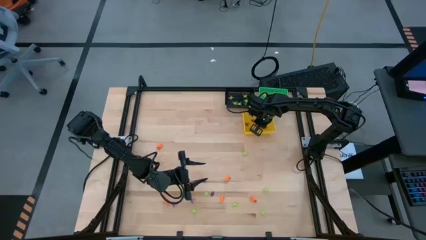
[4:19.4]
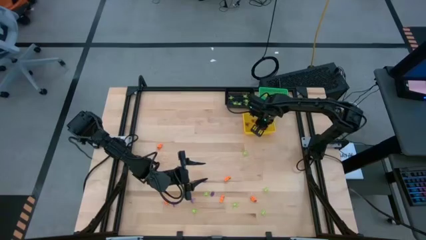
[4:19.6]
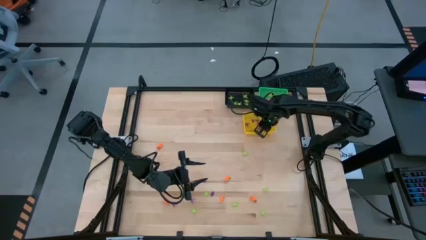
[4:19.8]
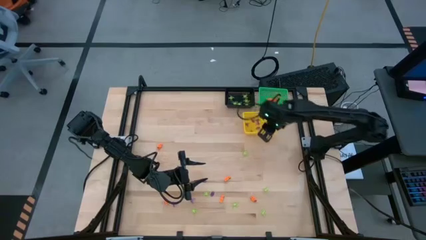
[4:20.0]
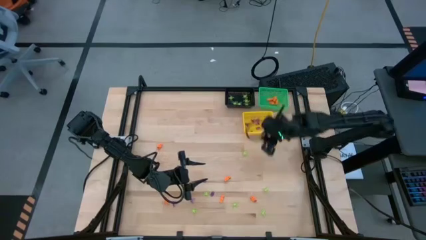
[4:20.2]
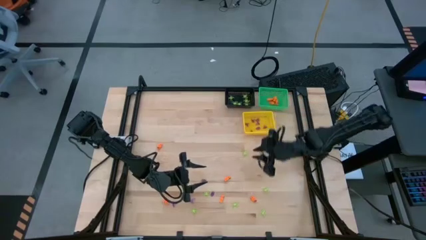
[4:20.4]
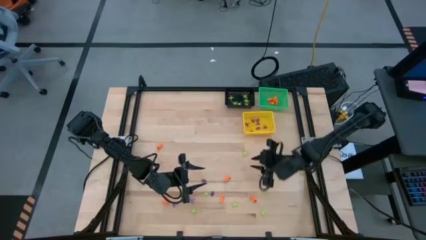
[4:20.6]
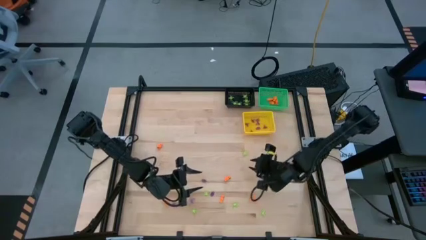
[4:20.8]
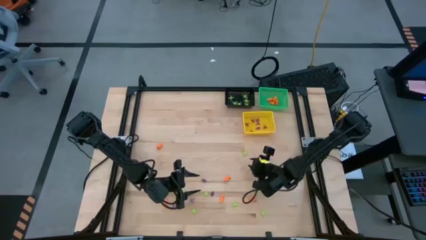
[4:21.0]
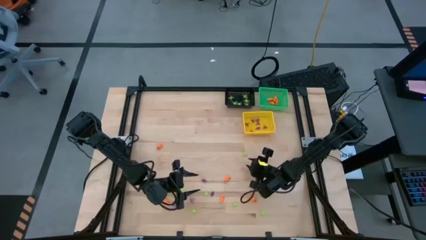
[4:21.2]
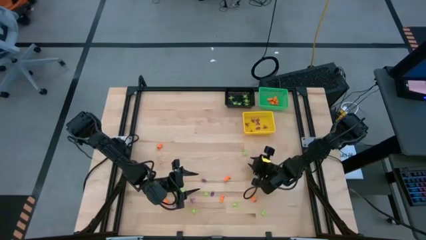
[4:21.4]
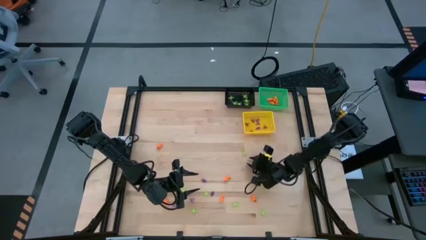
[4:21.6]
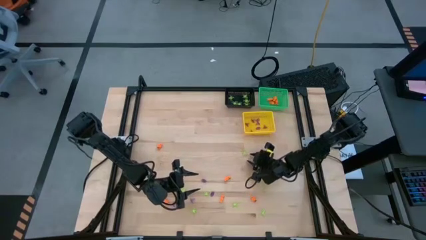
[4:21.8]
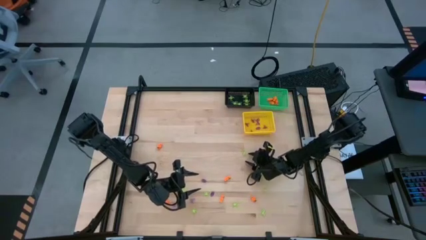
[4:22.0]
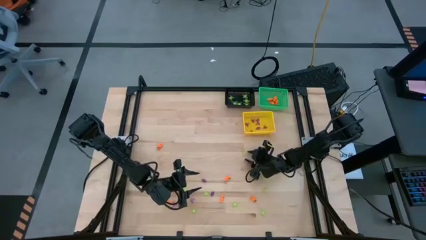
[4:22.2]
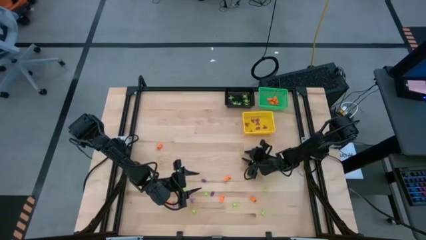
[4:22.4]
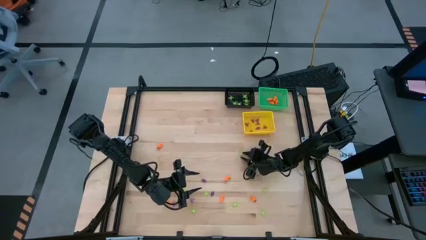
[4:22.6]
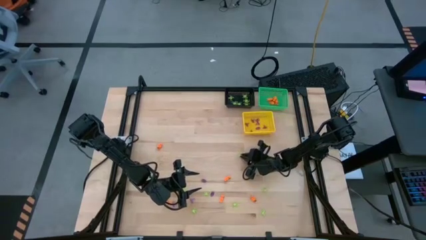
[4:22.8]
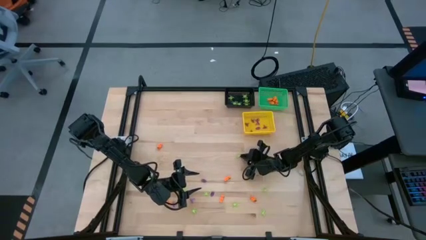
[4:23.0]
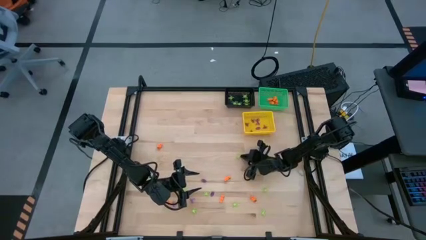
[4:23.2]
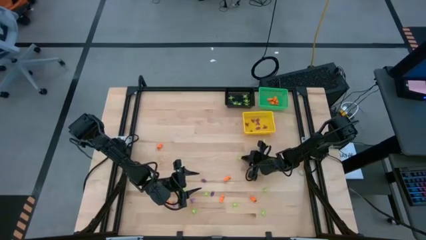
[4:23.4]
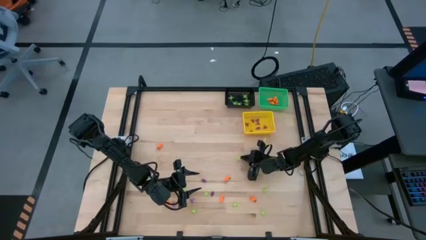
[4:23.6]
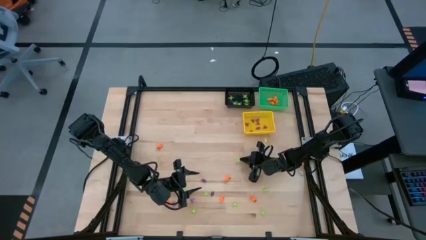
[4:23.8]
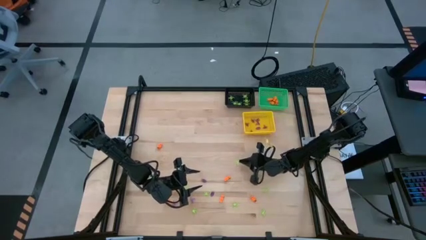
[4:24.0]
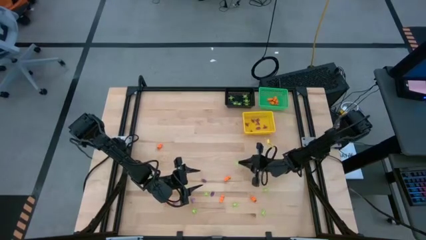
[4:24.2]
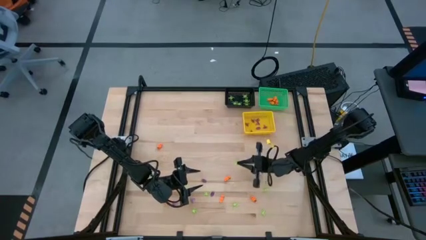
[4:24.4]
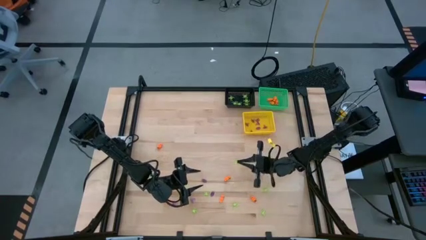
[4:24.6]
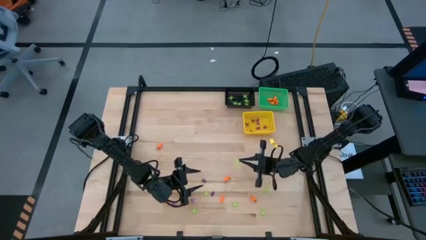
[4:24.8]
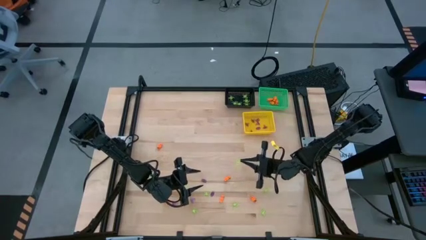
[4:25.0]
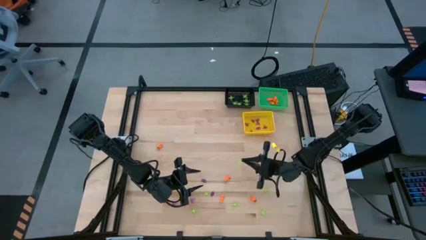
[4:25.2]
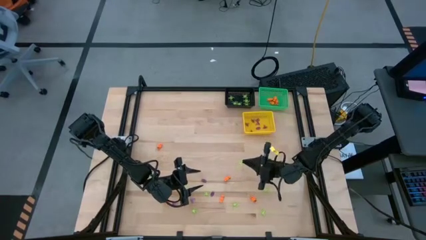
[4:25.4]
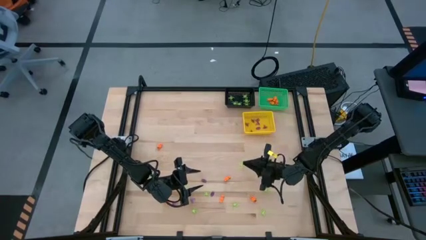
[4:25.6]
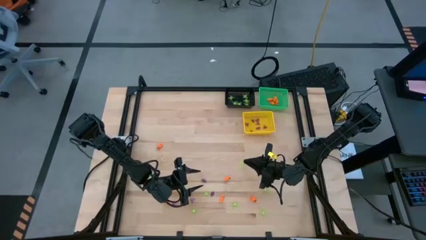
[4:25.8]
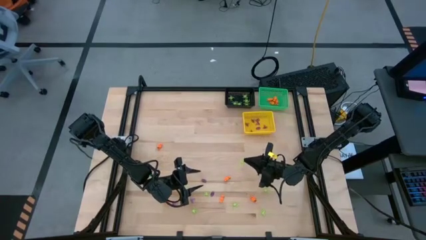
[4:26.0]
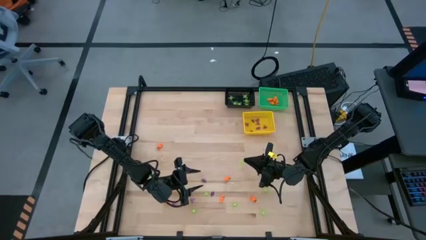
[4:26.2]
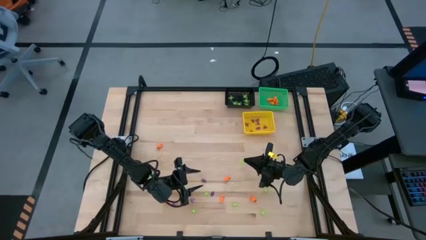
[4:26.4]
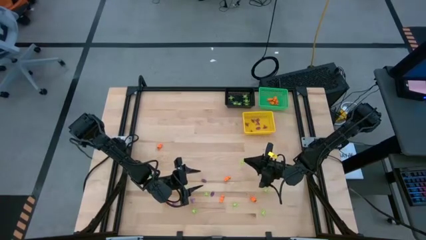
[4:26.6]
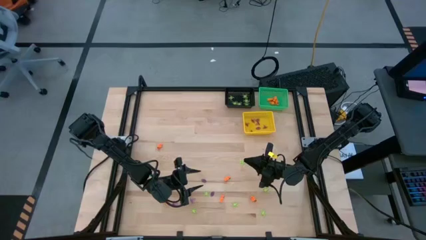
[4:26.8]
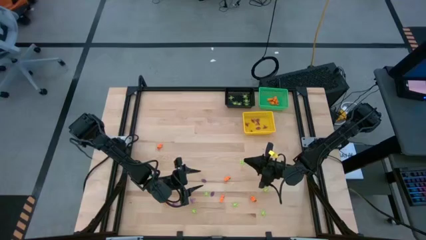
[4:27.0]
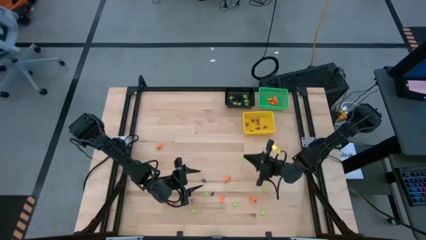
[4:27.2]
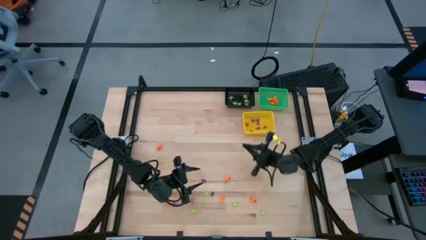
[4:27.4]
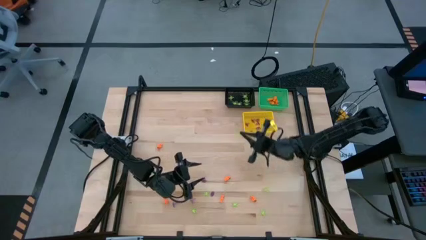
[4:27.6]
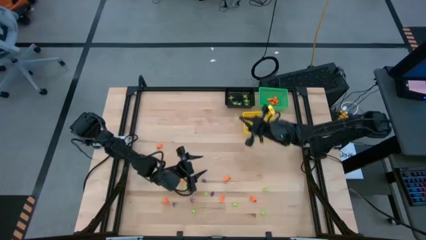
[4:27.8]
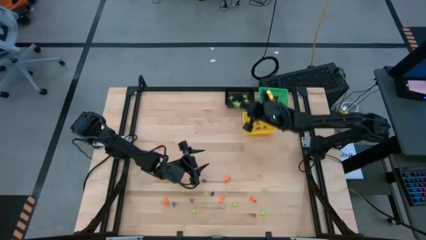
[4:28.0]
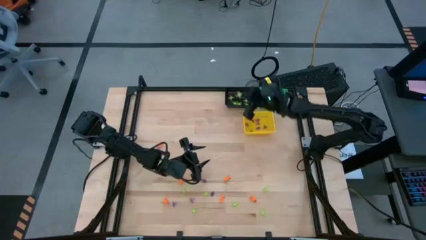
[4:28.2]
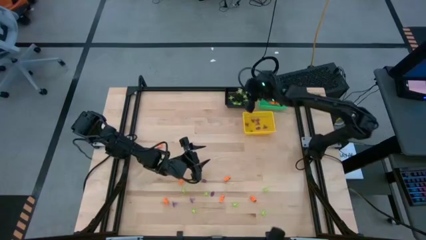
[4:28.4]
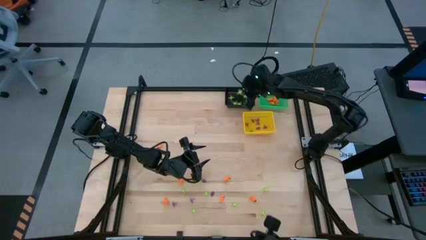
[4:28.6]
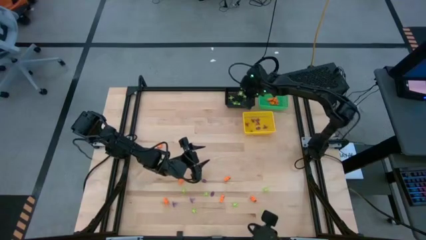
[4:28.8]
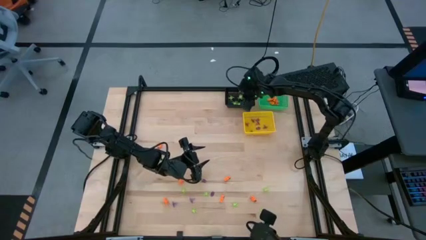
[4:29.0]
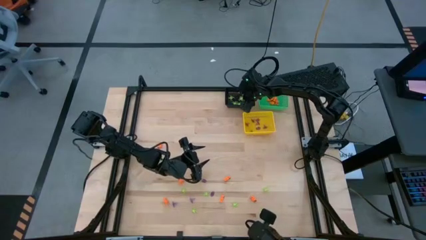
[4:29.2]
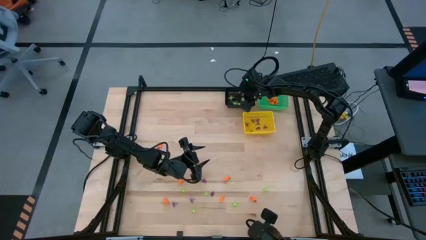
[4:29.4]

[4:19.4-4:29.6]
Task: Sort Halloween decoration
Put the green spider toy into the black basket

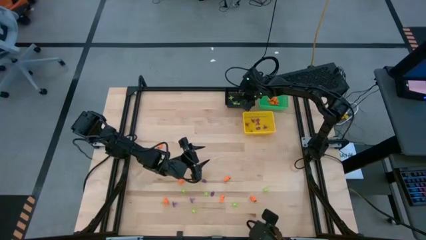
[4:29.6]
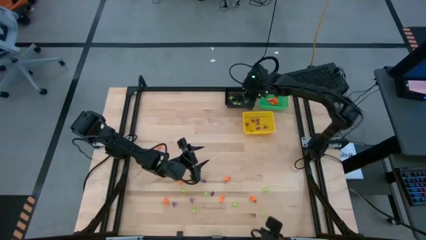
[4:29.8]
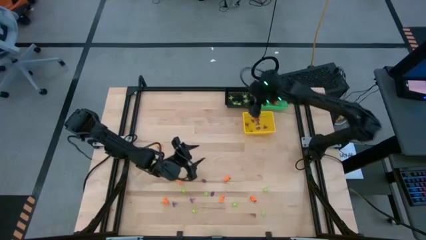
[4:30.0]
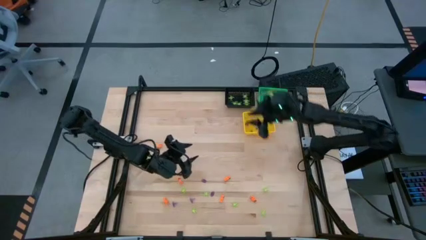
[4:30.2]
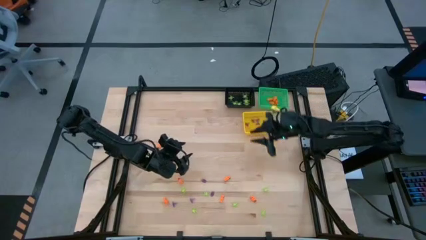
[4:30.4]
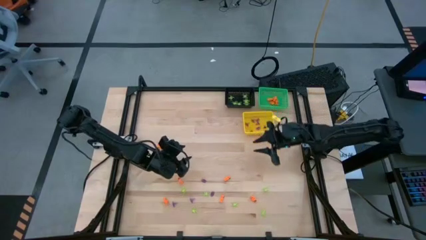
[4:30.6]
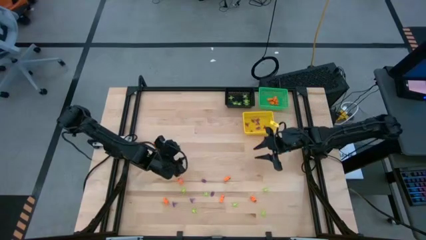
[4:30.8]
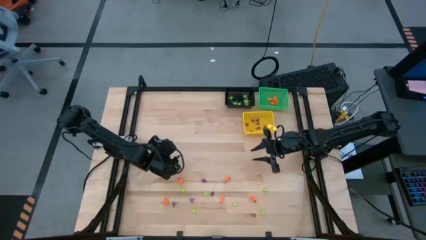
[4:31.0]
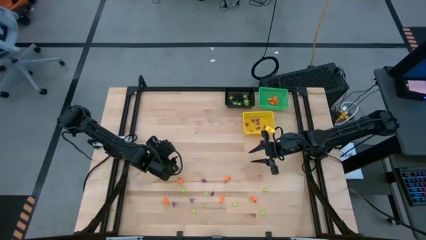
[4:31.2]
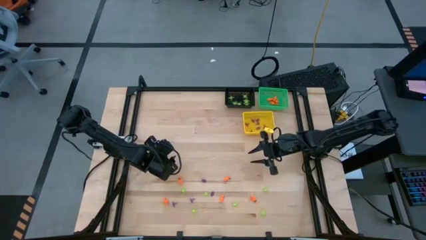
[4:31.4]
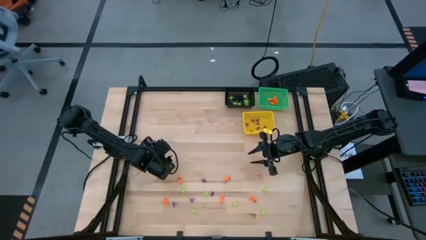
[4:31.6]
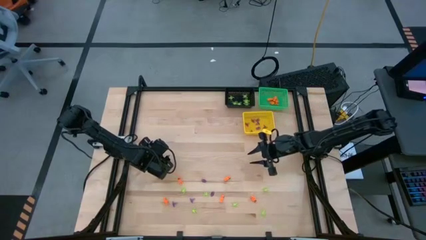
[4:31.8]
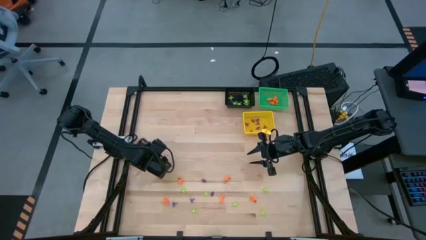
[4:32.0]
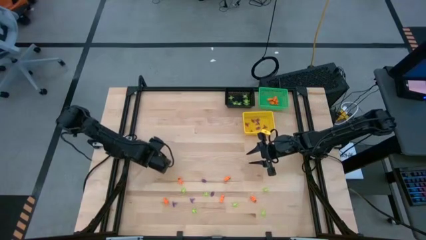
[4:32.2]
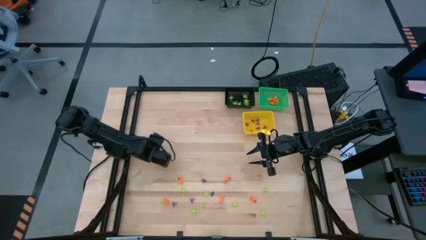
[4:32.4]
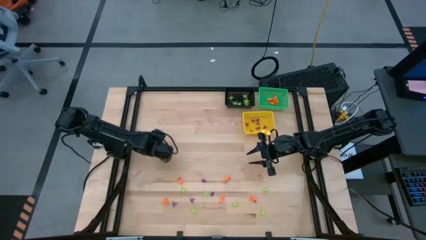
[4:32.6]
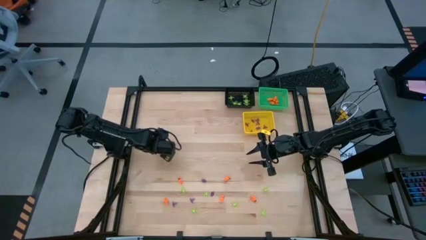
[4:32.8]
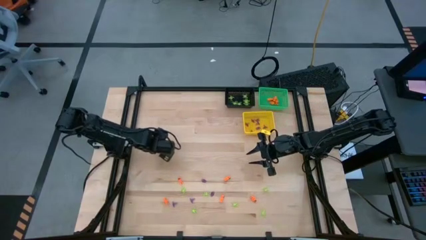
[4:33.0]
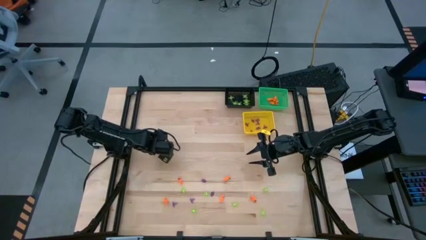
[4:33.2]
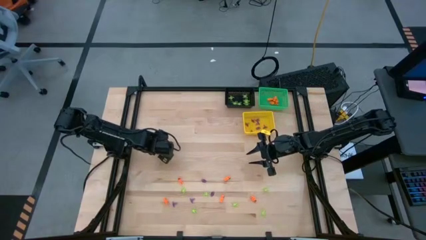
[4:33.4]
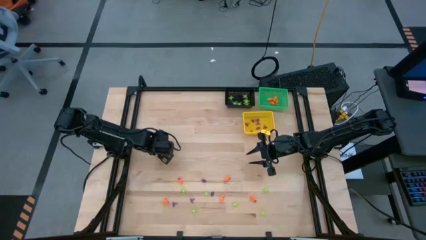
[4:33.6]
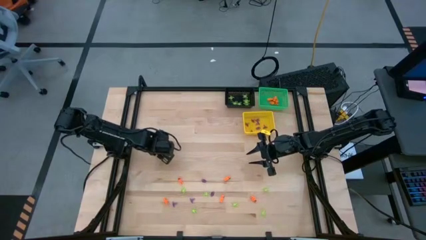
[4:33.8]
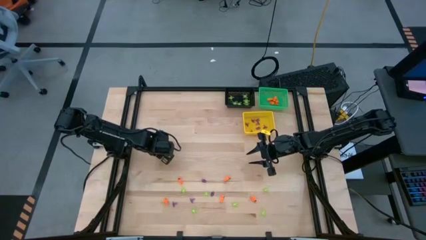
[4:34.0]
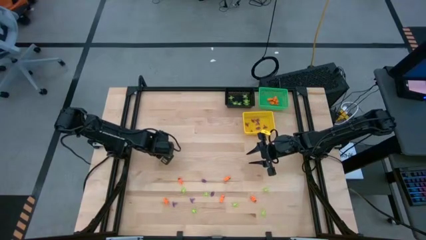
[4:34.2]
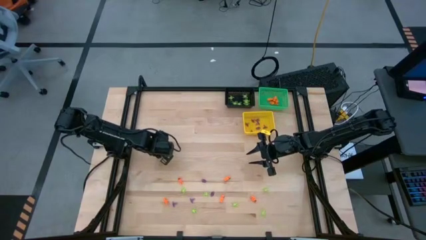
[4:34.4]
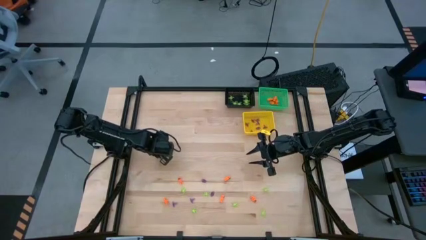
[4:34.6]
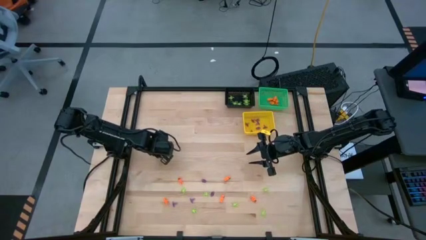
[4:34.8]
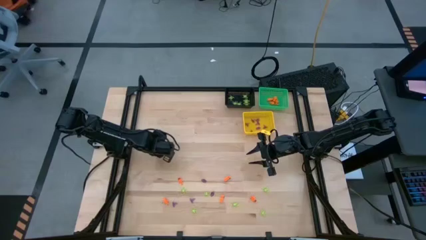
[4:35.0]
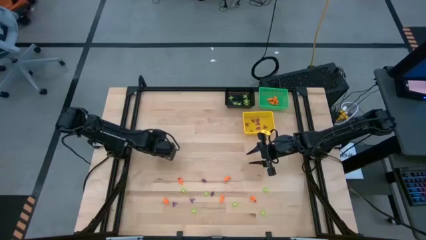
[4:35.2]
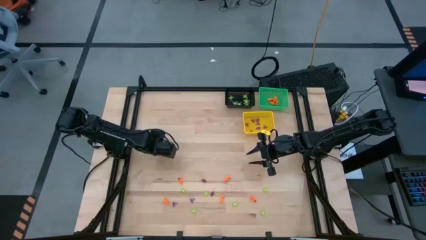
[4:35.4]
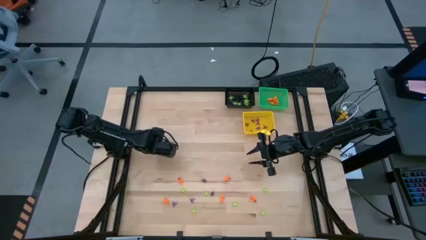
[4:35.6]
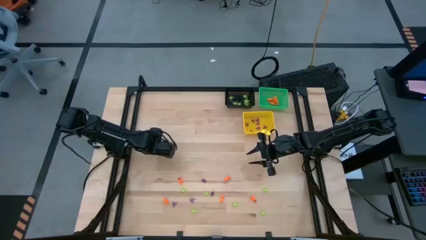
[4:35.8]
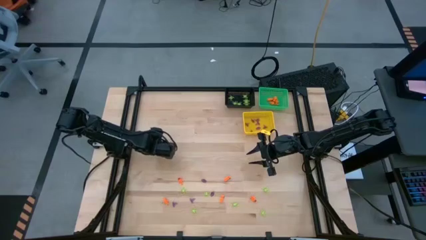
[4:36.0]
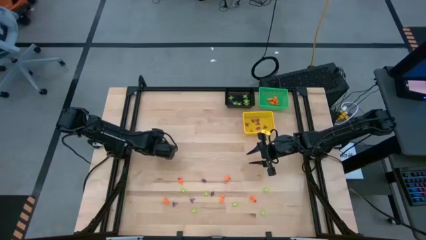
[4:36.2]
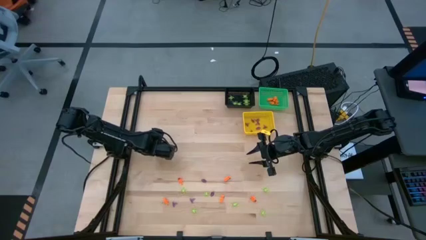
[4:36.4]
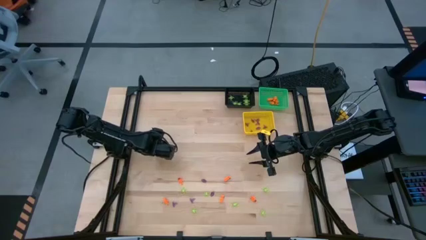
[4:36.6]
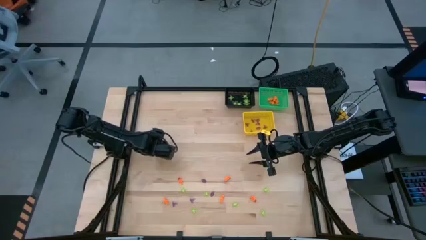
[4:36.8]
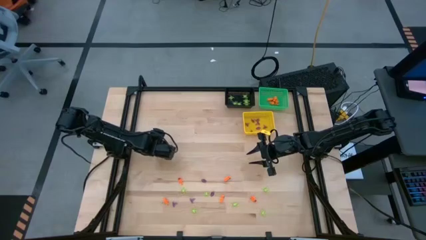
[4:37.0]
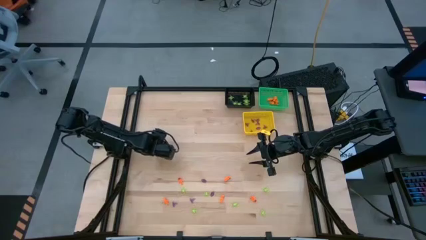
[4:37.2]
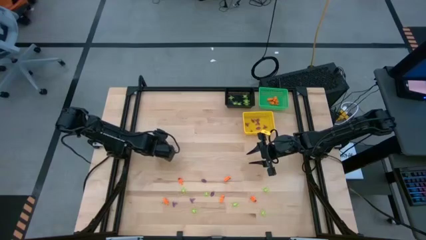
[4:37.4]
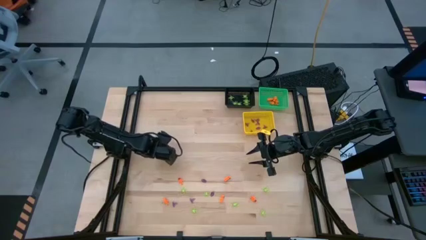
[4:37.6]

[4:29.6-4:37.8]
Put the orange skeleton toy into the green basket
